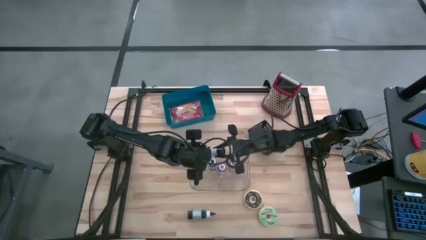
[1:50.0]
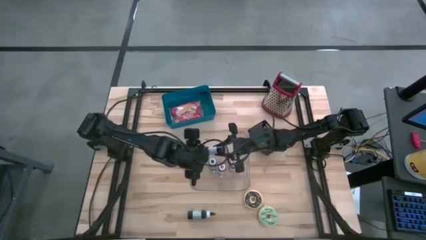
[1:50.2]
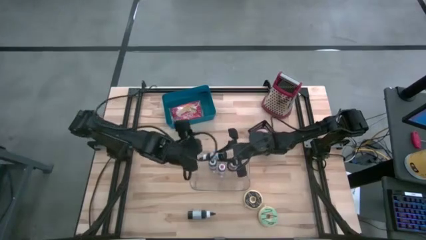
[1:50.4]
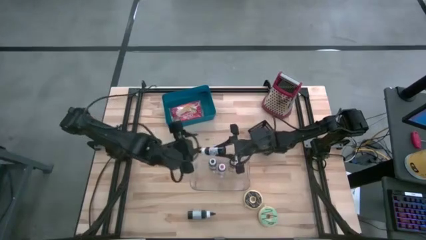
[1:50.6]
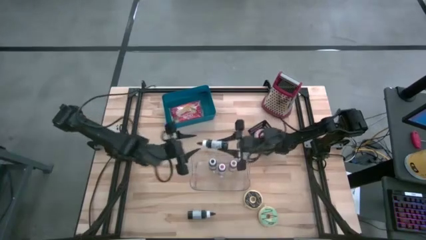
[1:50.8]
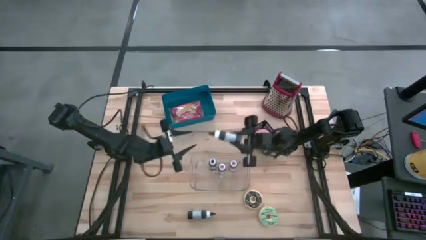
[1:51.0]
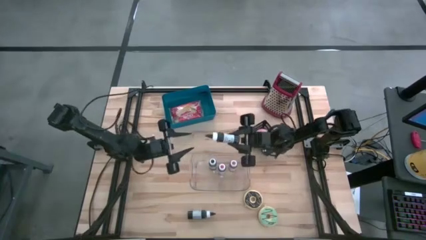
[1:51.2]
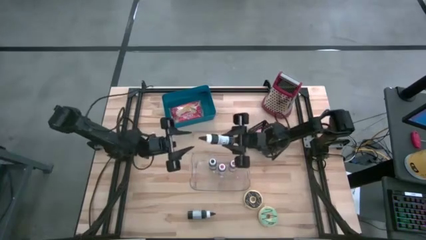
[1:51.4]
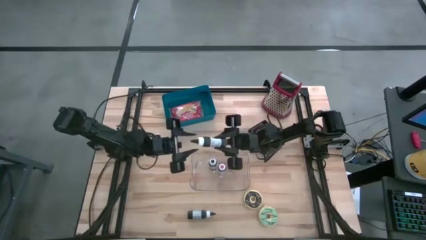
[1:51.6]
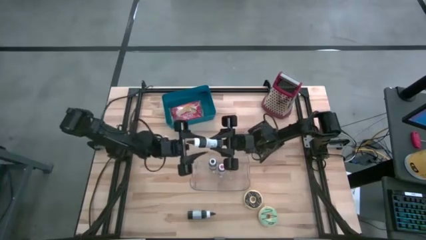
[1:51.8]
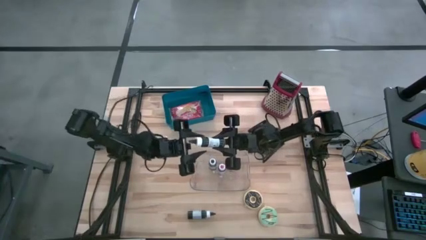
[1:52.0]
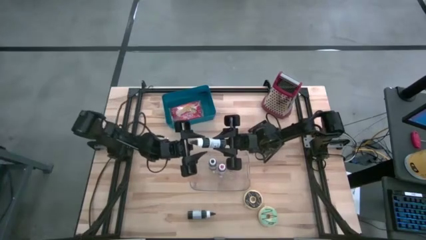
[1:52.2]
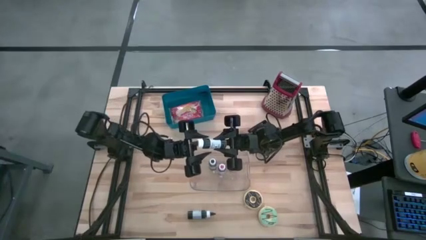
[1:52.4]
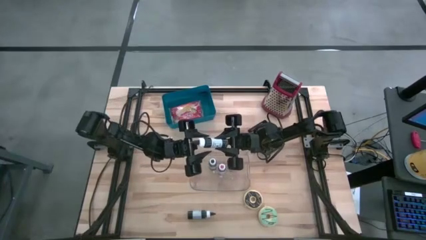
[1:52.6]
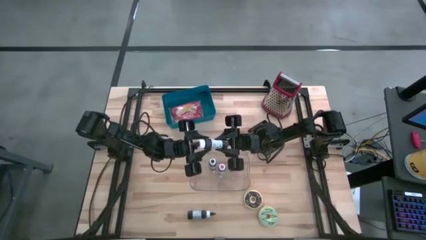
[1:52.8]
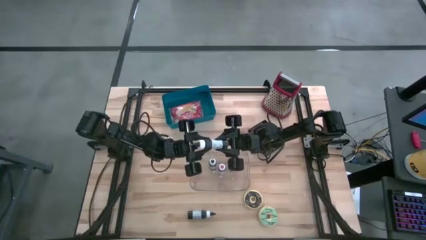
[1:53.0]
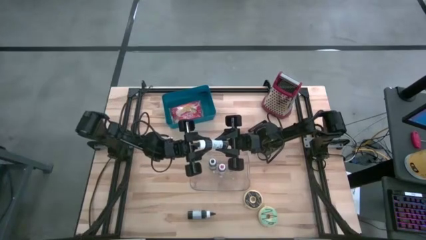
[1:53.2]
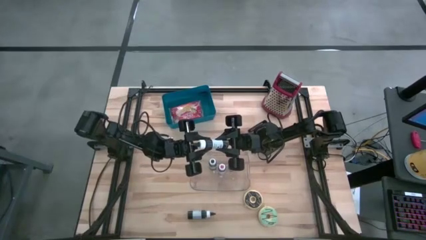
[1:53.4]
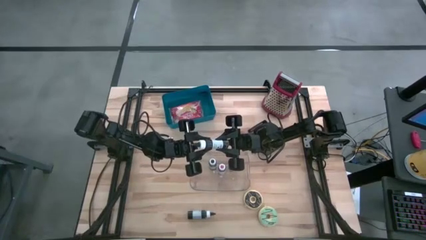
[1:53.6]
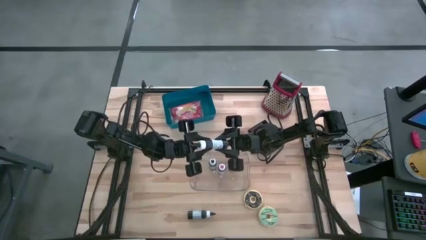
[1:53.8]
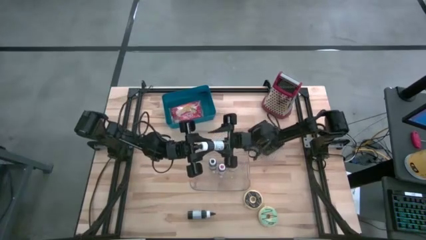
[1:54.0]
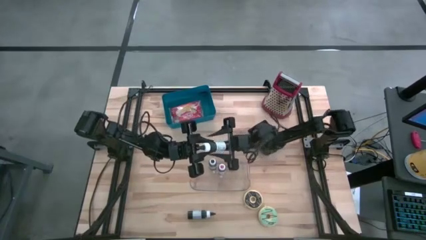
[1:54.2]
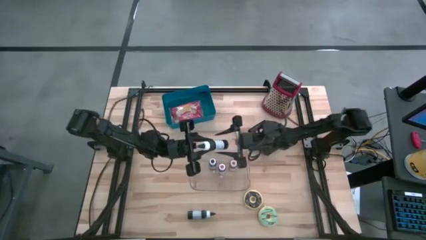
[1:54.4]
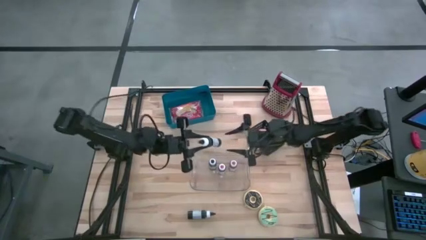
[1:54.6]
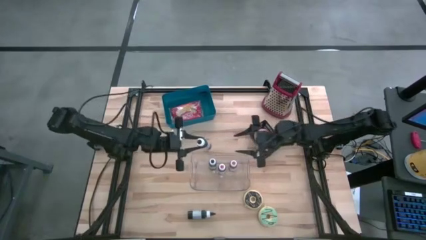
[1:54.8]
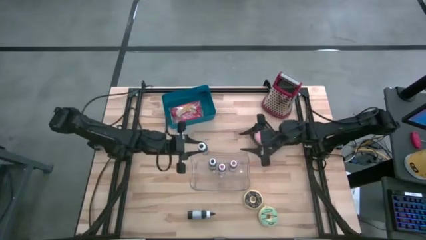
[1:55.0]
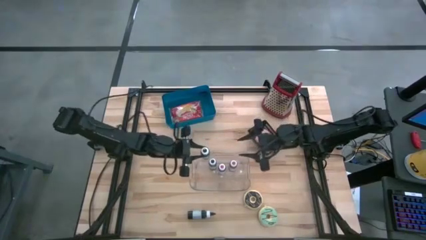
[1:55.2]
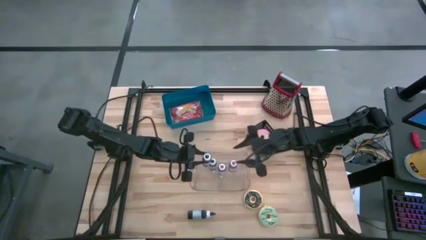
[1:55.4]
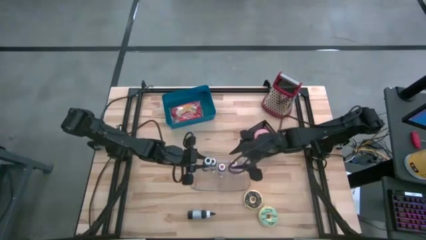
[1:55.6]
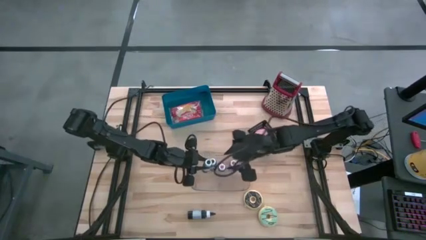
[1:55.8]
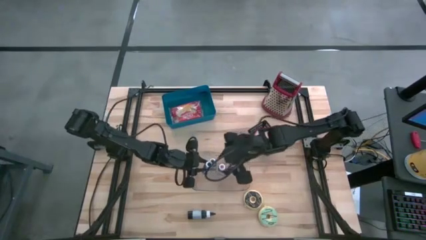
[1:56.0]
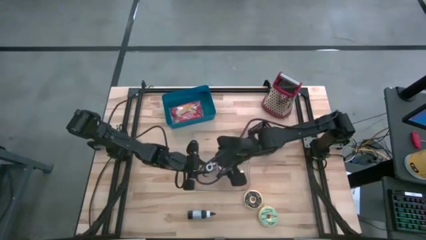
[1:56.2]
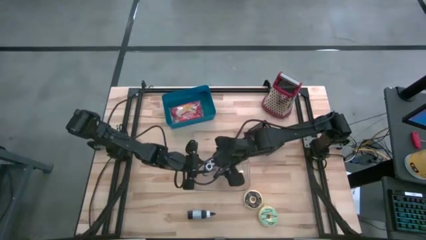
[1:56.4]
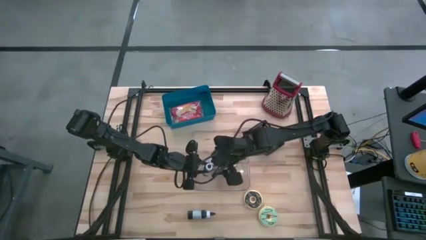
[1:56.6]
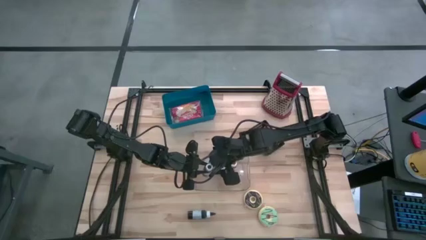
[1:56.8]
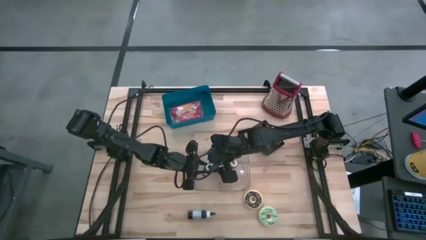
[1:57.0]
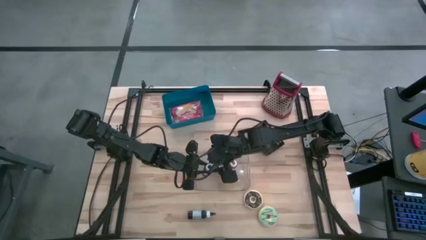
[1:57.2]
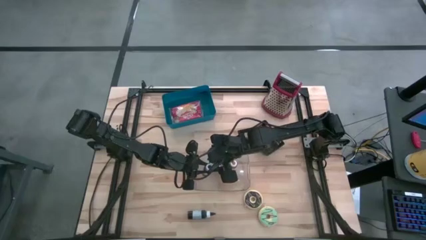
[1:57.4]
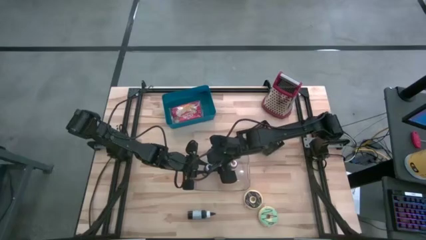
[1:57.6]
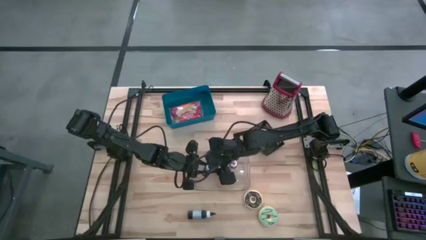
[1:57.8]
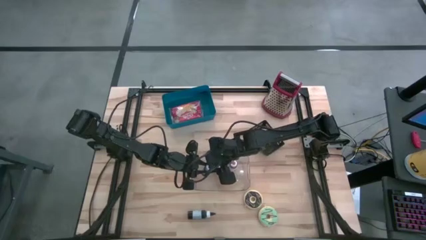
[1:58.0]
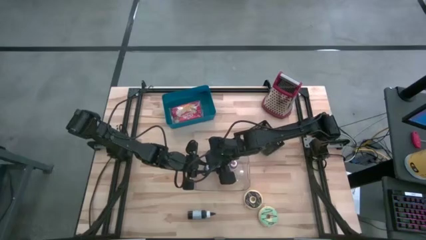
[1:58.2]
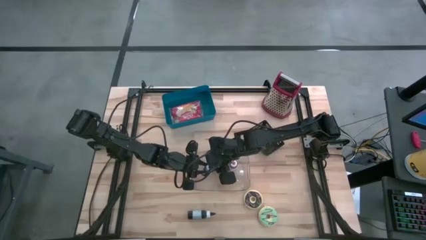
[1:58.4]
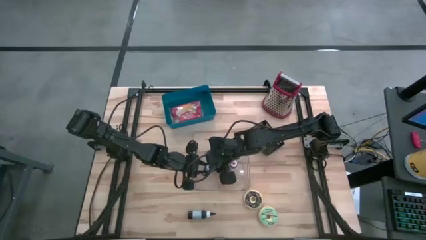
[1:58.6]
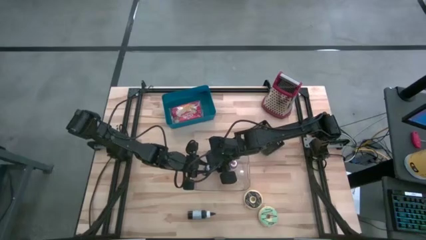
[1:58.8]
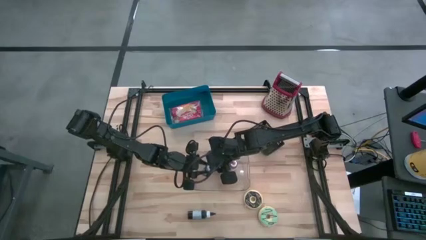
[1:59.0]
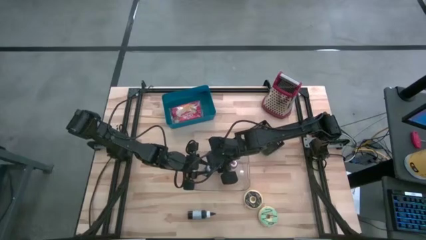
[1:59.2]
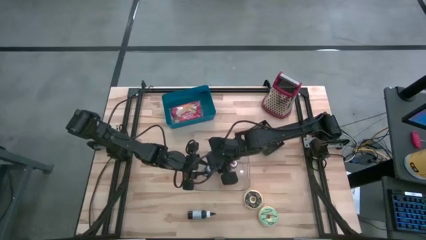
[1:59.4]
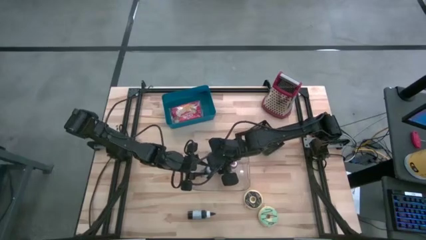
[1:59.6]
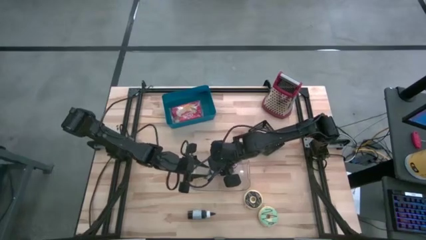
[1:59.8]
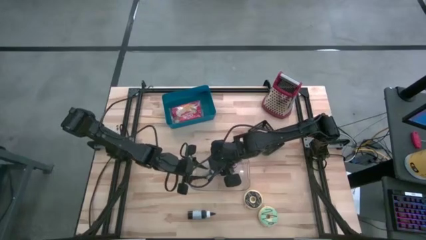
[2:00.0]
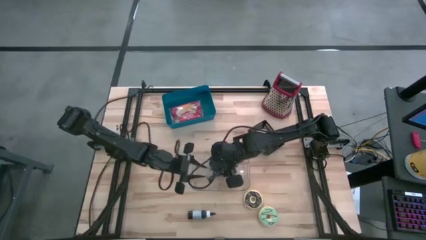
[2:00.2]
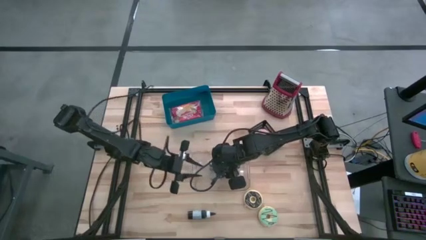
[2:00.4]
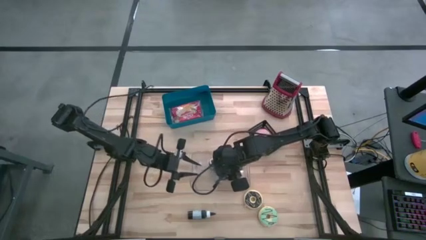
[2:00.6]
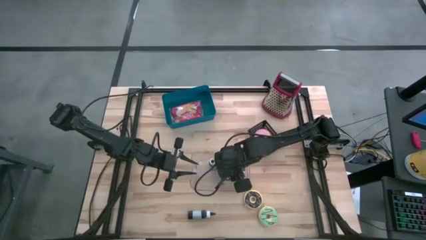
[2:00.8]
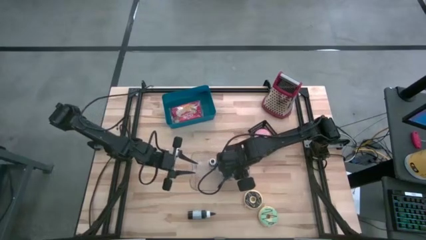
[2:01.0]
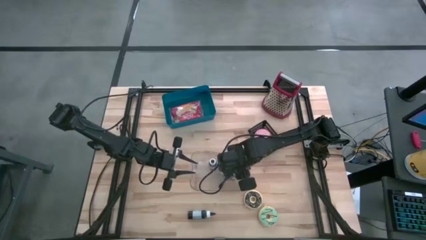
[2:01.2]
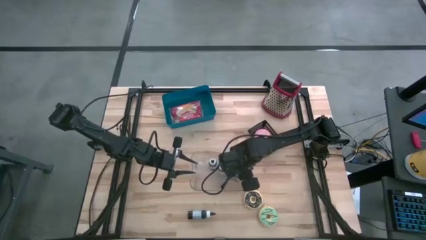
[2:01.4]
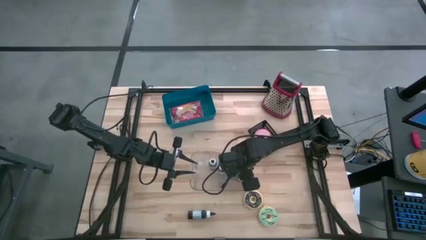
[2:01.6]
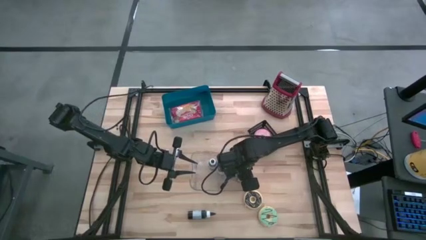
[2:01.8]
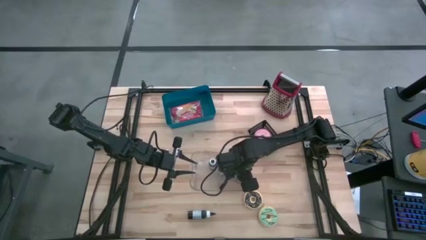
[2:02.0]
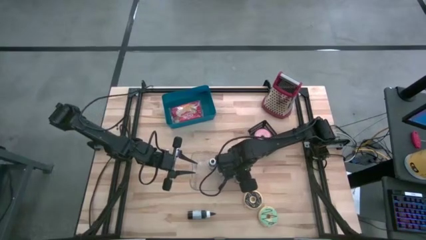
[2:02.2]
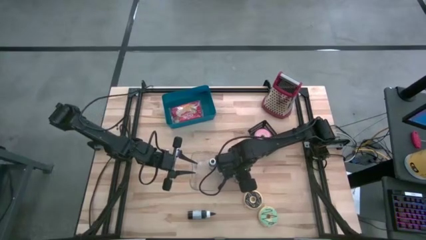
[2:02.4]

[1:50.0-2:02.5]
Put the top black food coloring bottle into the transparent bin
